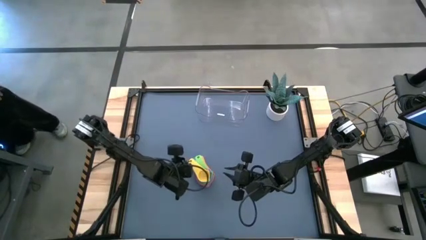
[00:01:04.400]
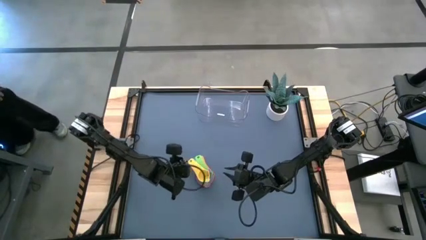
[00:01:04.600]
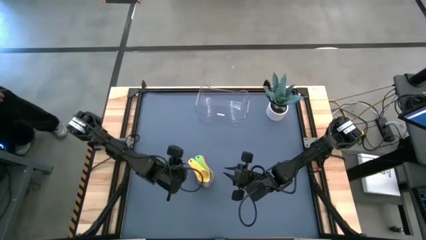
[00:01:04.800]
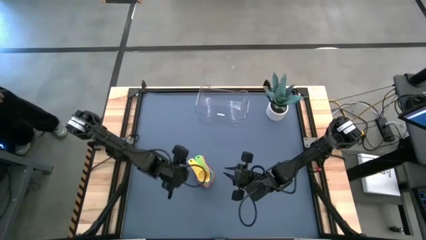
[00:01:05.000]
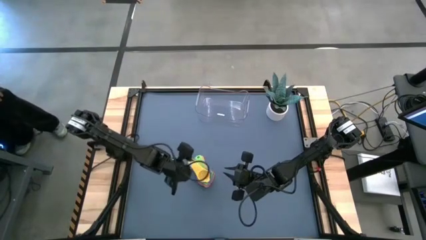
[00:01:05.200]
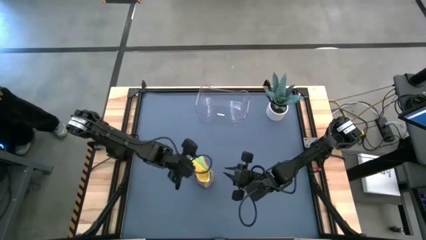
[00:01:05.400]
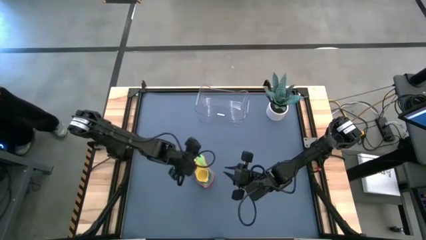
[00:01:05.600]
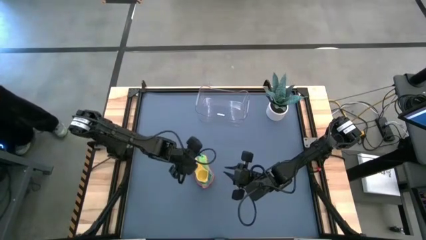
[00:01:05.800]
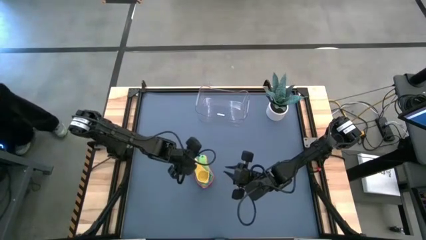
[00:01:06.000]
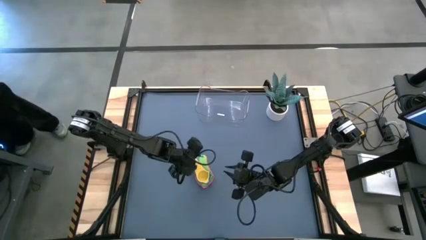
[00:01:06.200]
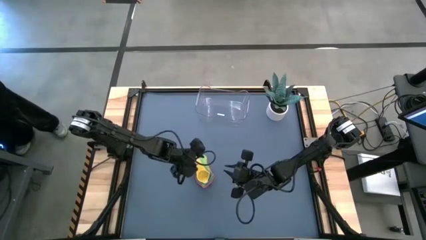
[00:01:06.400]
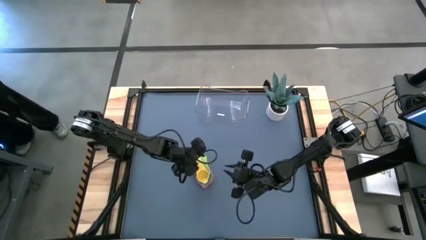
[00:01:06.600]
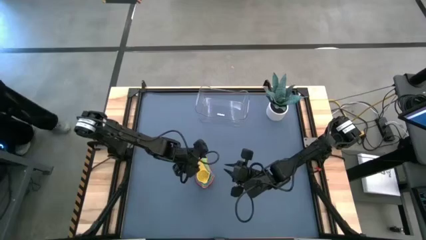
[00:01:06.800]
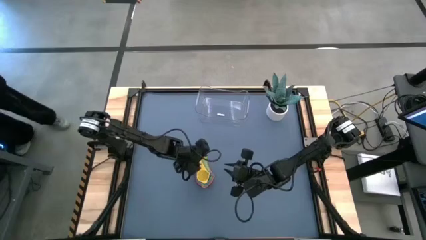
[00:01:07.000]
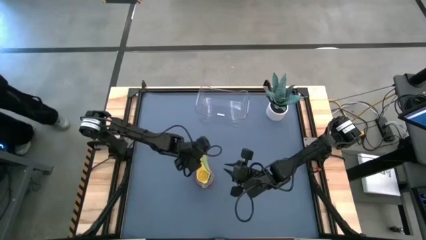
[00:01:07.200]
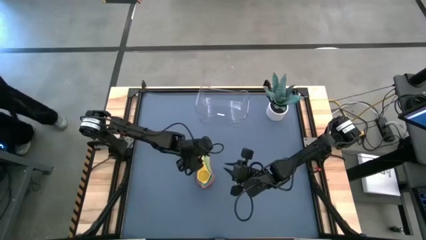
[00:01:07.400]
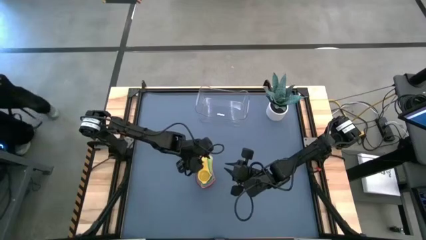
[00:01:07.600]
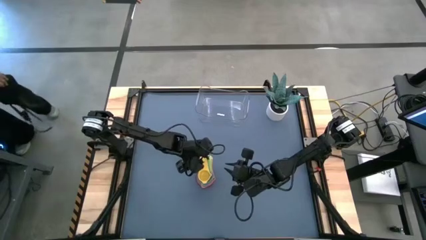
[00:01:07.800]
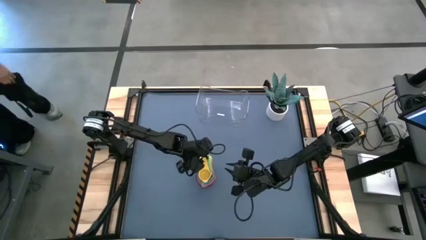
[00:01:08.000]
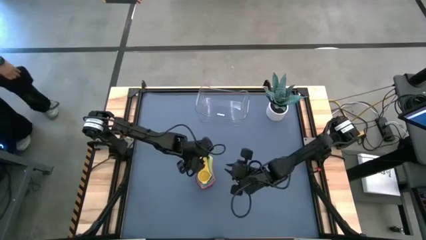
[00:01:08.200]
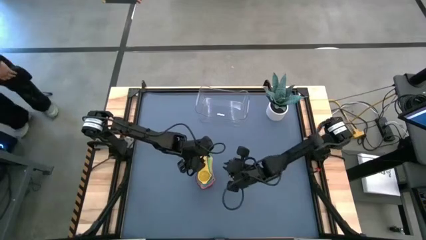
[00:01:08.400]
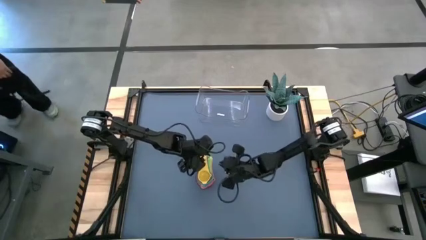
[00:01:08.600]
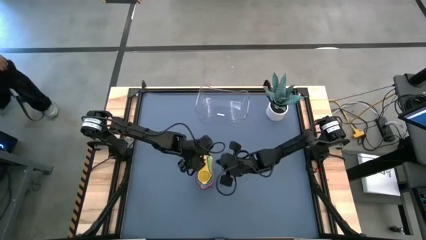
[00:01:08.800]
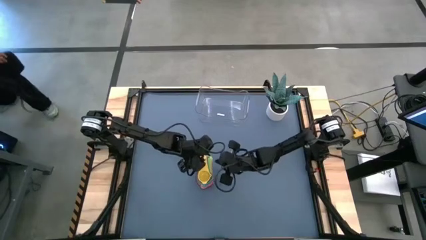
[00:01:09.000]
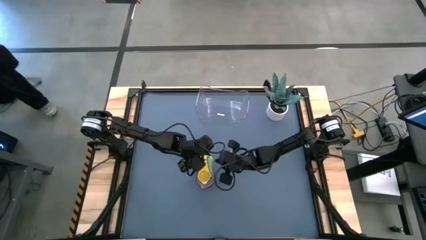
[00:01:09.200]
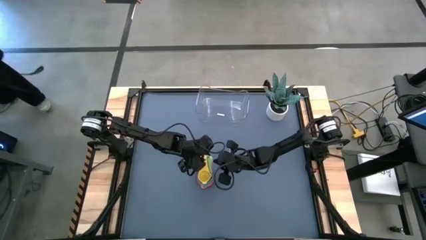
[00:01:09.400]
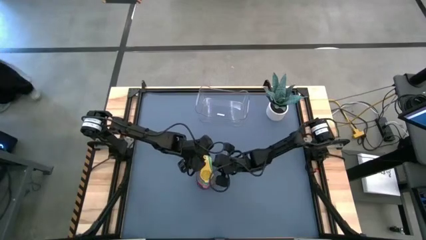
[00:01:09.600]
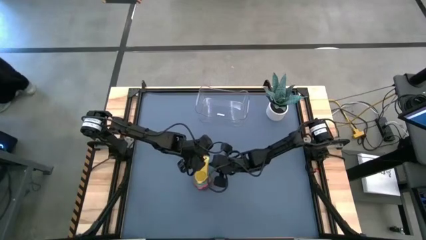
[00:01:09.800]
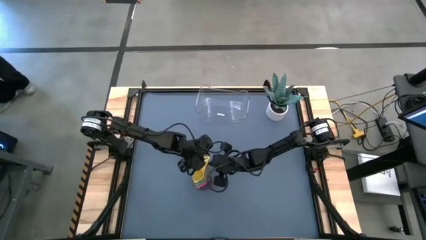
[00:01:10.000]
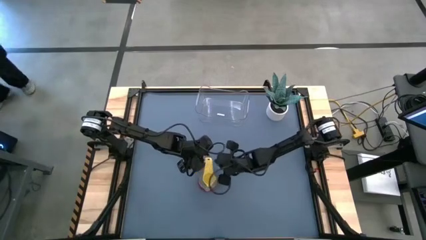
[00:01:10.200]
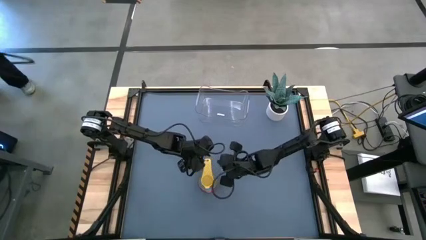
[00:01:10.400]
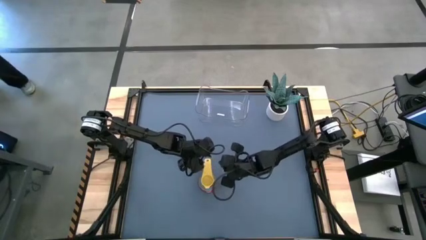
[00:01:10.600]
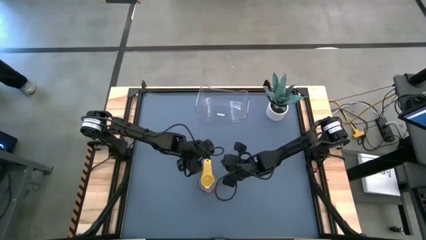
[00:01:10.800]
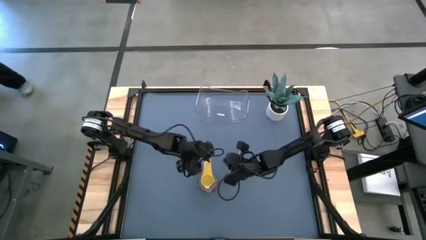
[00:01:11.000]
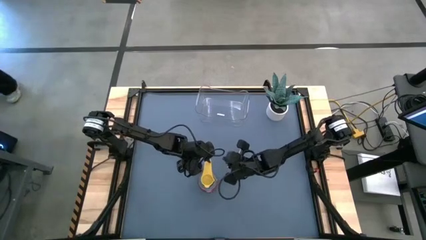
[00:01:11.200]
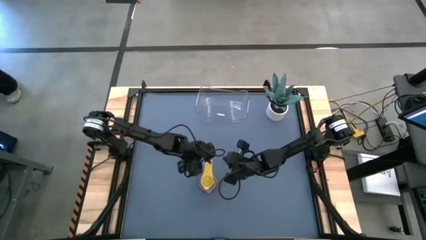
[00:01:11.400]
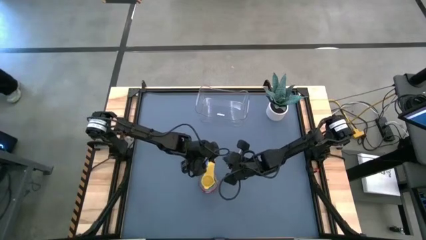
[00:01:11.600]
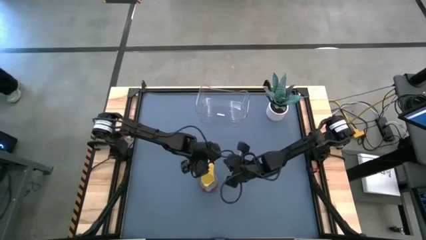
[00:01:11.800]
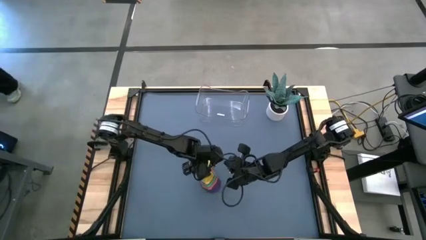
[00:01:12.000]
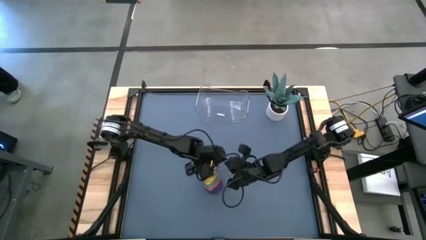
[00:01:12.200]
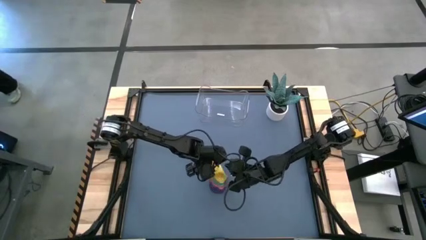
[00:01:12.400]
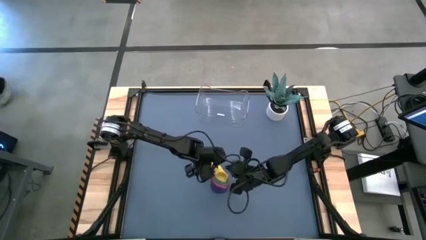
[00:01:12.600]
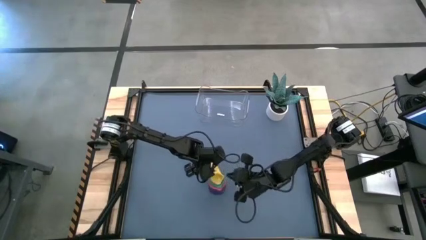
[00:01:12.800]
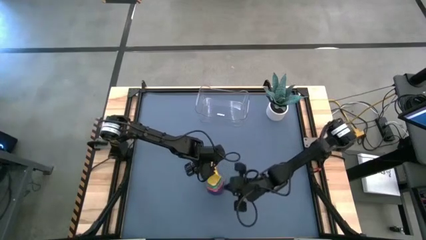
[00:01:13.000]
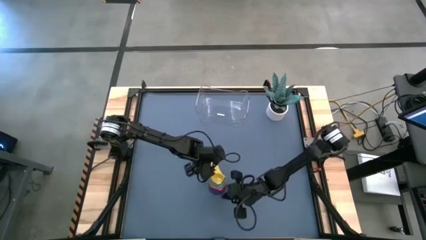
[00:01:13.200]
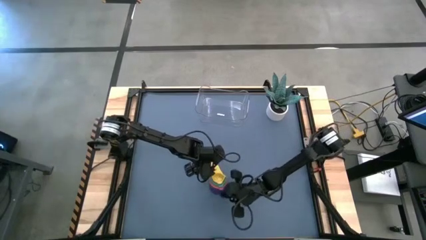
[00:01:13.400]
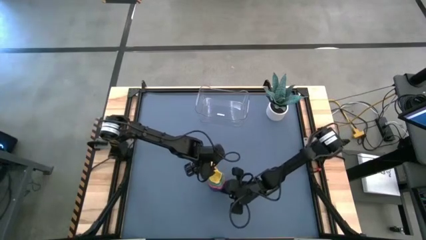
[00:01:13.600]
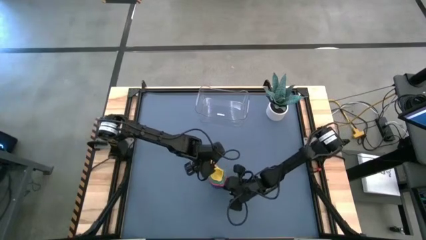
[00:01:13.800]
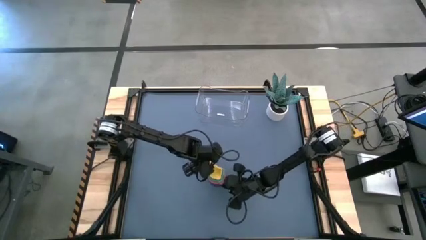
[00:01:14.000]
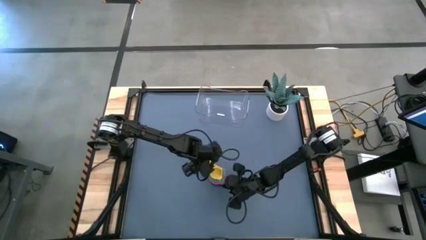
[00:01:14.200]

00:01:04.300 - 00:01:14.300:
Task: Nest measuring cups in basket
Put the nested measuring cups into the transparent bin

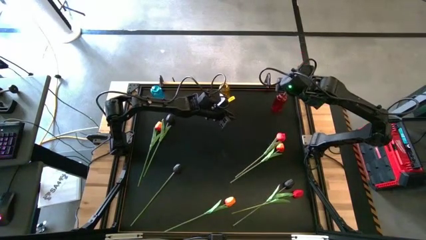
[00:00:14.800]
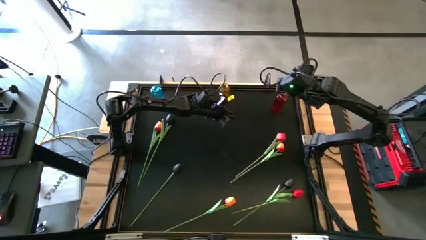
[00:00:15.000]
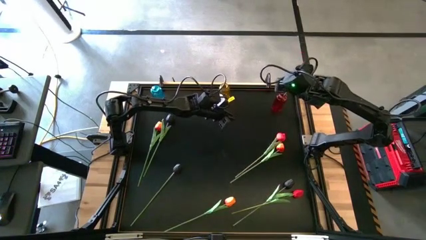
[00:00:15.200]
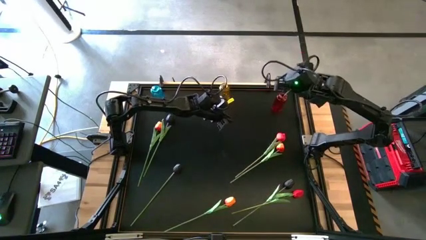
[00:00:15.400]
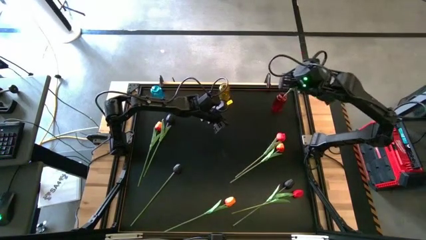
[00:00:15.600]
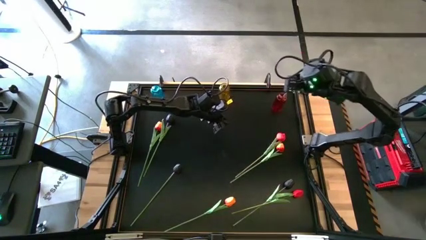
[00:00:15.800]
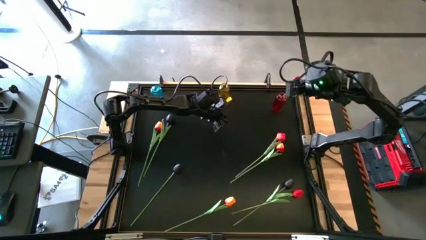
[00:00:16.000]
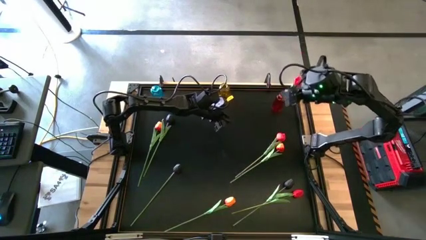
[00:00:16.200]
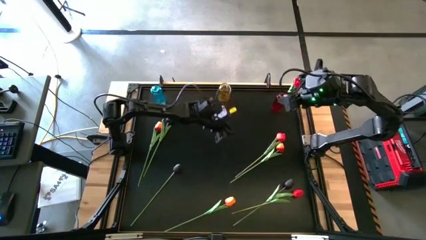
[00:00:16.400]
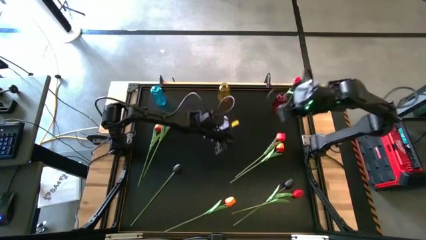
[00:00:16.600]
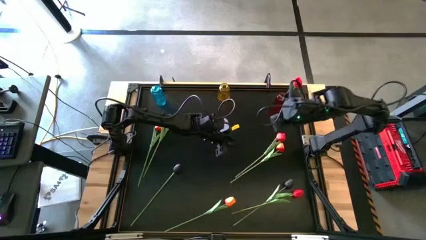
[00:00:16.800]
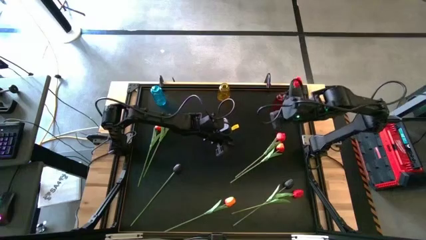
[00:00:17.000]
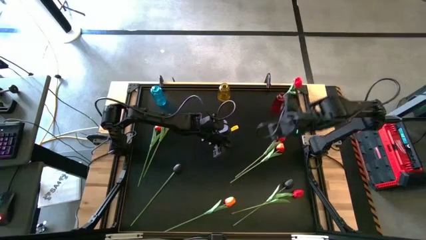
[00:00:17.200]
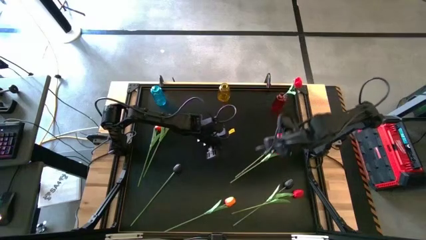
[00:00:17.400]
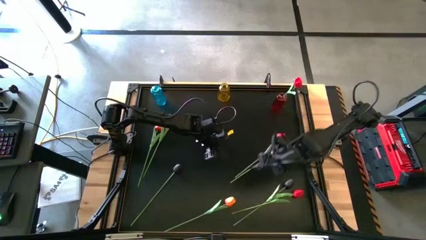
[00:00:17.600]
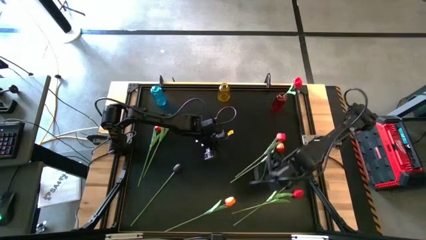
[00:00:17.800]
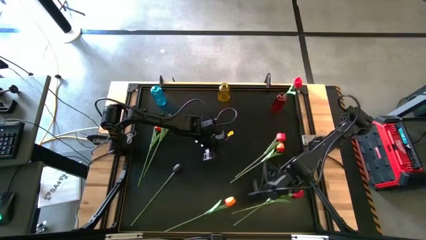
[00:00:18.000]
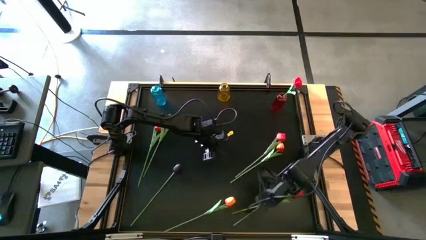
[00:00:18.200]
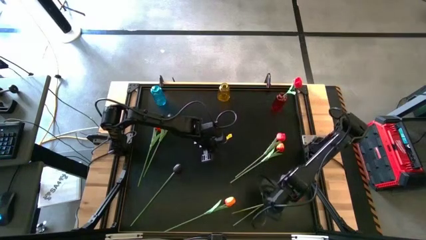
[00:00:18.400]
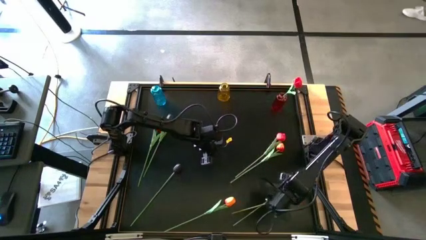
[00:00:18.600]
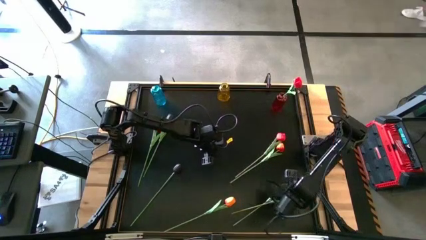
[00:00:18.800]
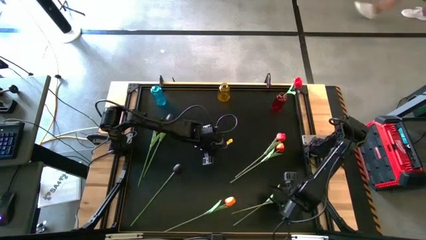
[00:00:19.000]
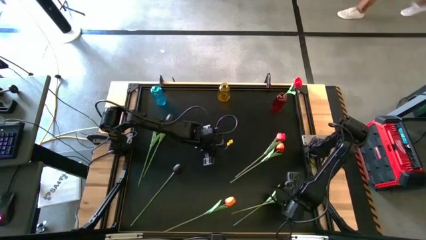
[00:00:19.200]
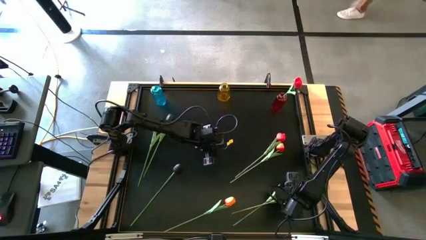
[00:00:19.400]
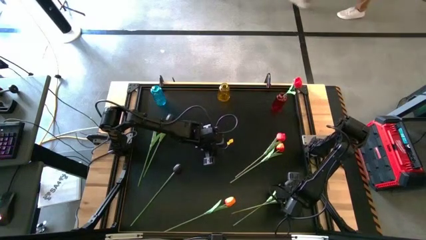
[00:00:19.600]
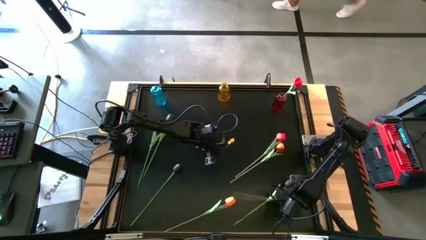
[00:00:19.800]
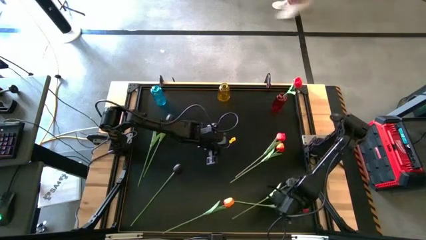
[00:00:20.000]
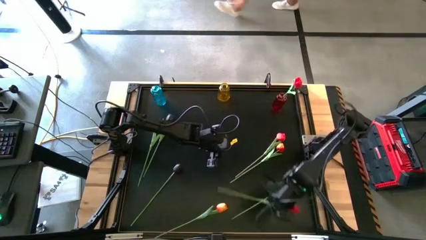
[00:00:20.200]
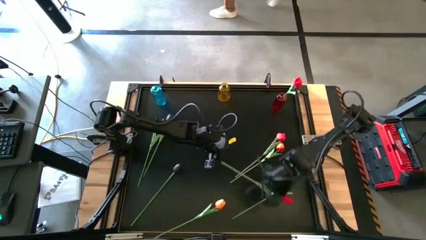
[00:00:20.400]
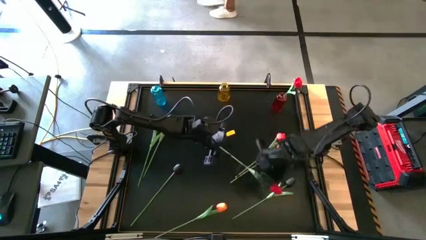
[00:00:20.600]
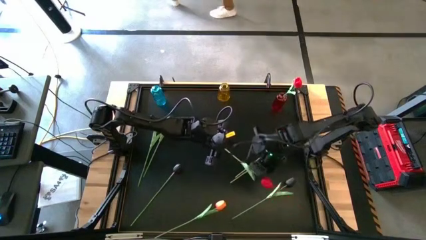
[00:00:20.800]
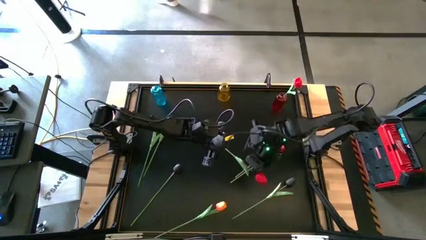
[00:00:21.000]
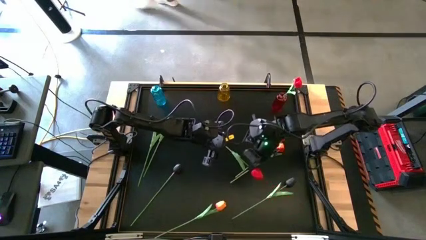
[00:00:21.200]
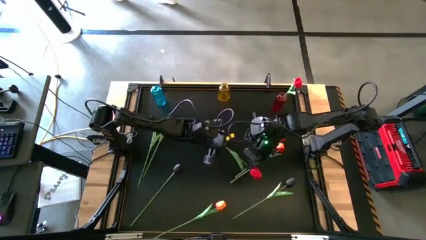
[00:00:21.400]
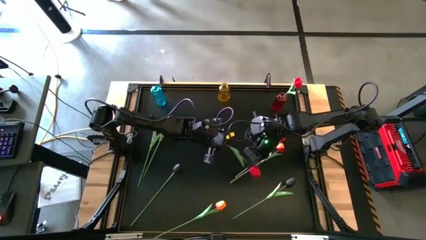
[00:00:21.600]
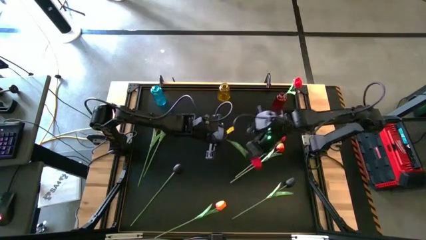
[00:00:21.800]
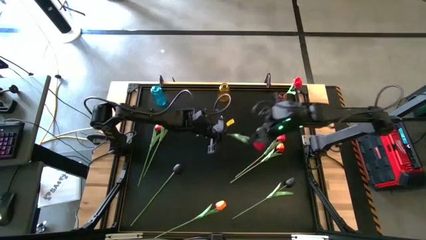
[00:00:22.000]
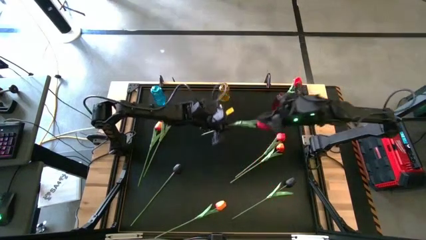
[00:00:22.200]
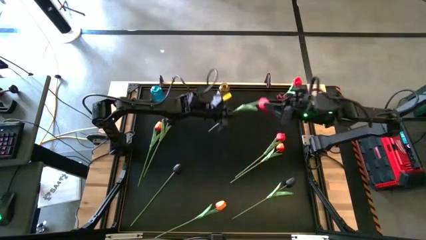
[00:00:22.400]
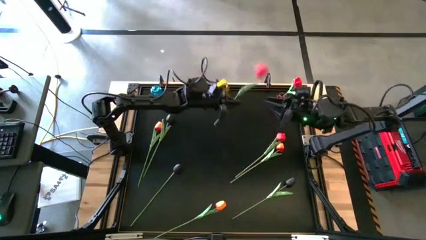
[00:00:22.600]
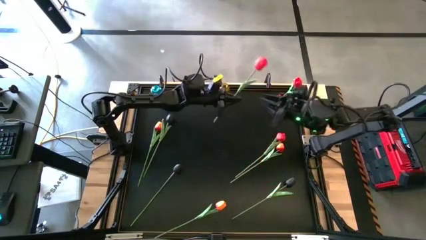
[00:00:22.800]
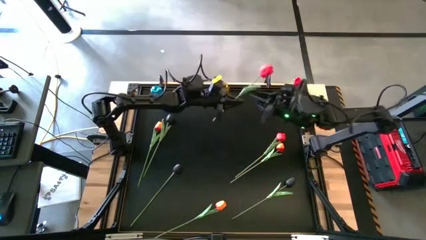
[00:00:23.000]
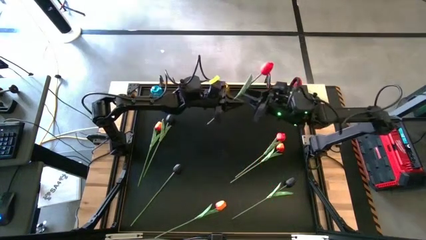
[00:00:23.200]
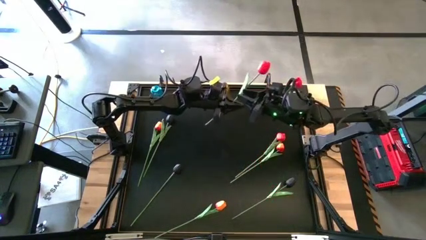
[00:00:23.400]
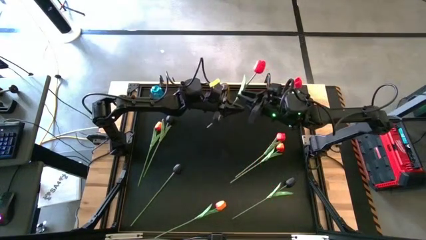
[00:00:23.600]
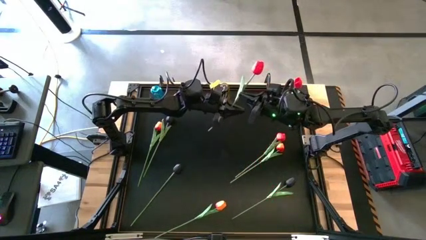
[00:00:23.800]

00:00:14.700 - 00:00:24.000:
Task: Sort flowers into vase by color
Put the bottom red flower into the red vase
